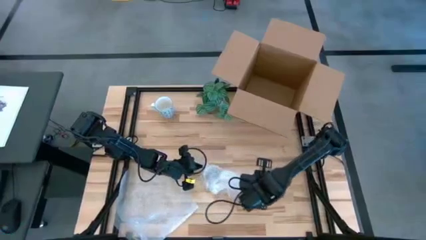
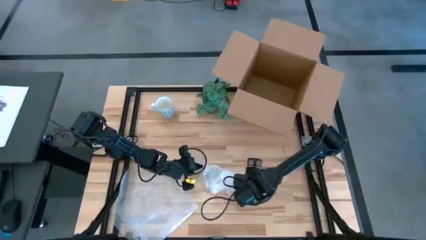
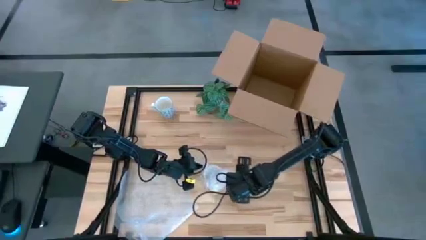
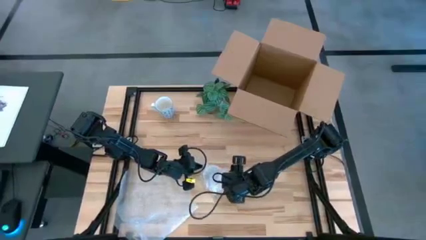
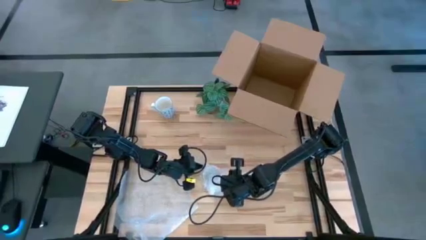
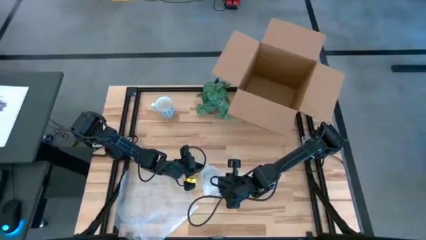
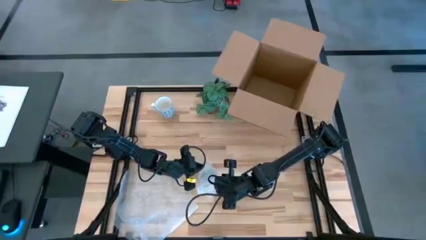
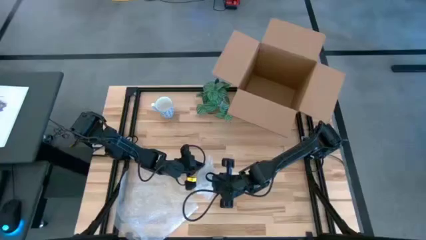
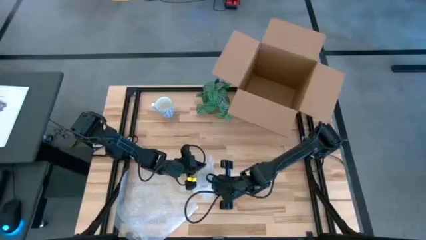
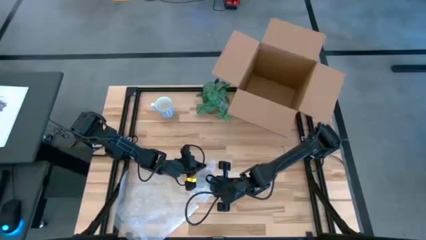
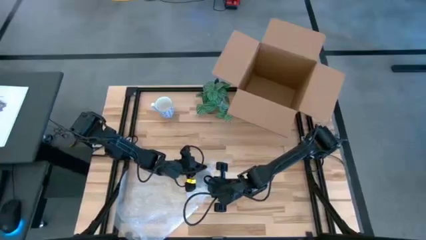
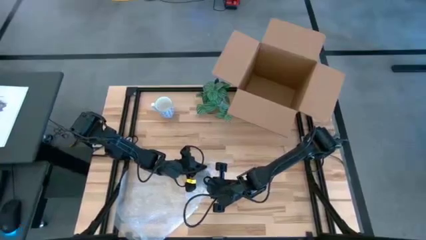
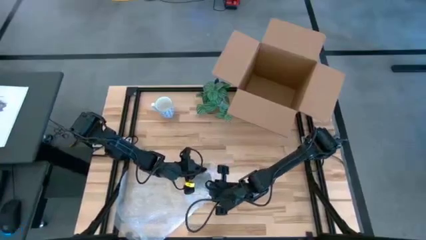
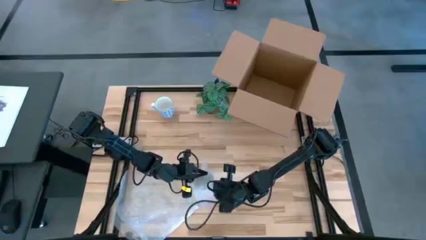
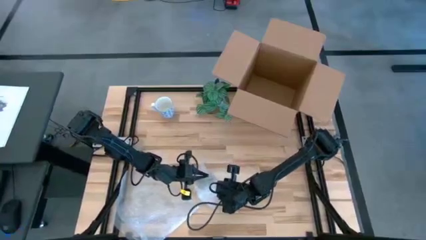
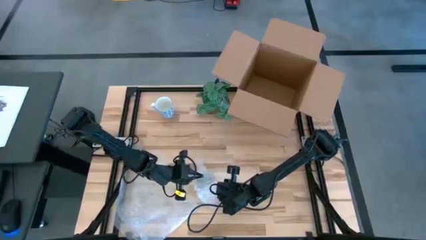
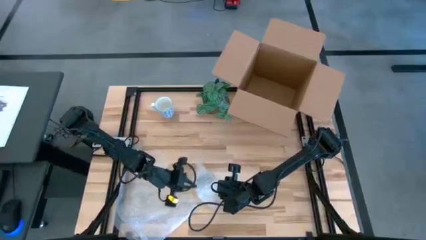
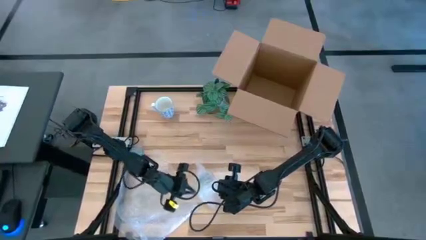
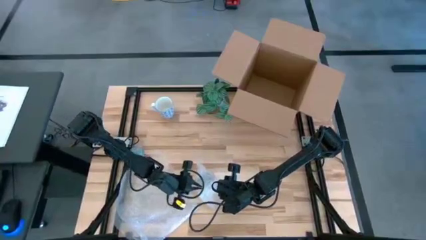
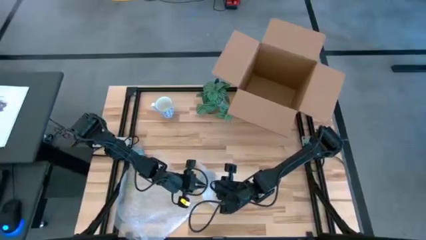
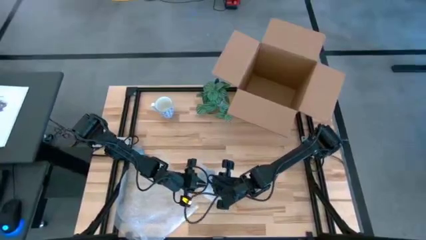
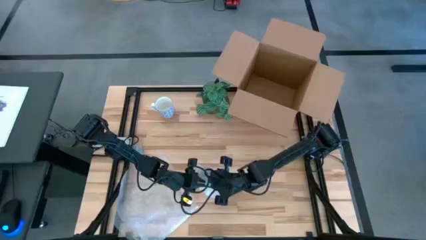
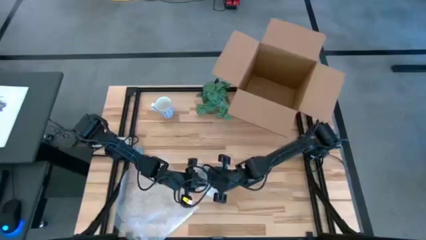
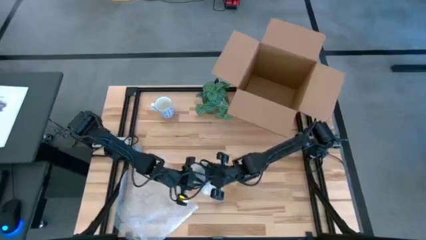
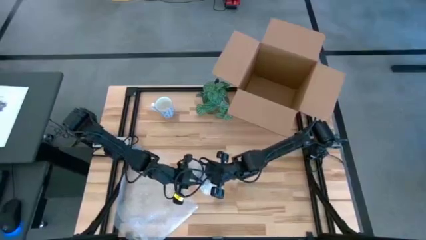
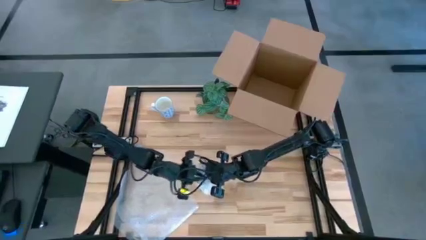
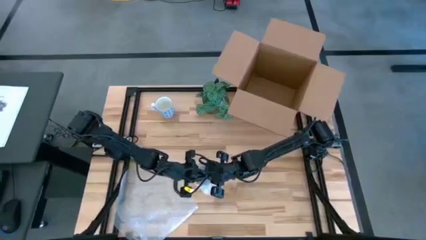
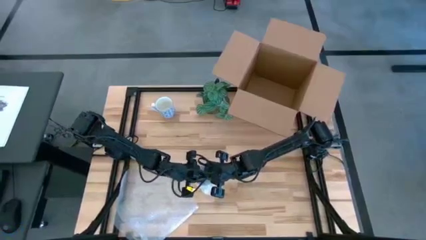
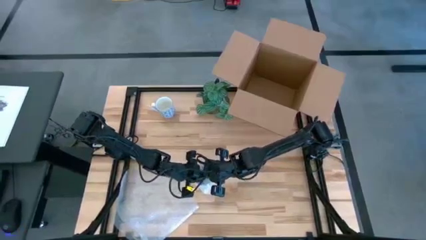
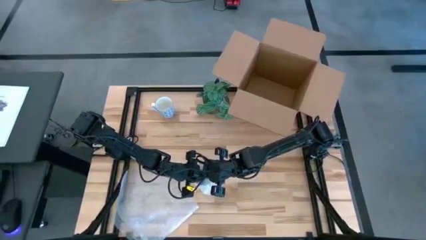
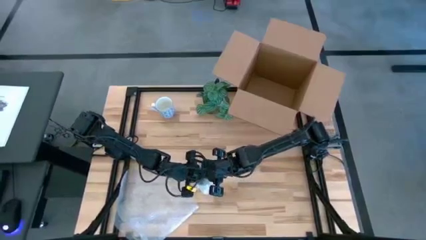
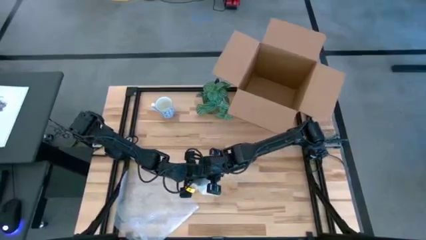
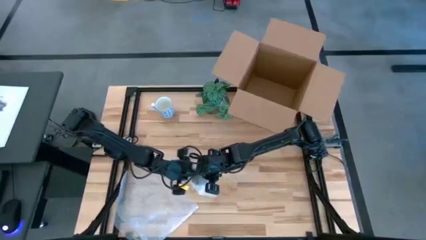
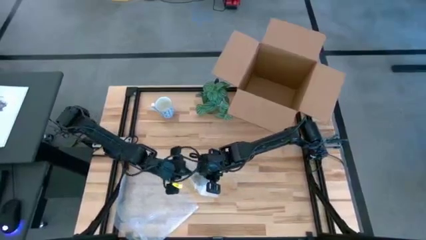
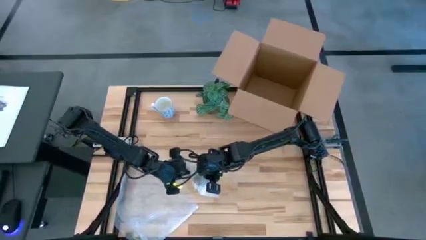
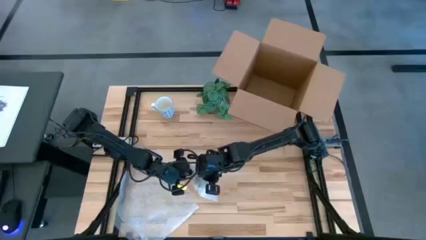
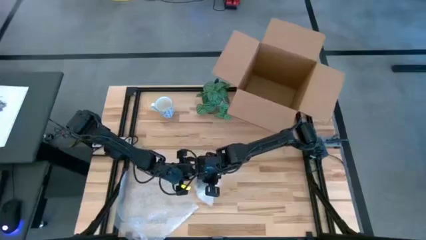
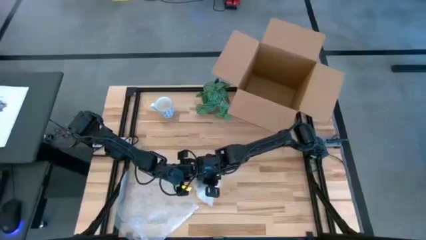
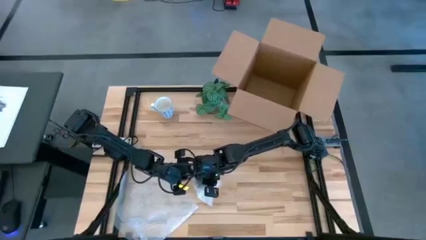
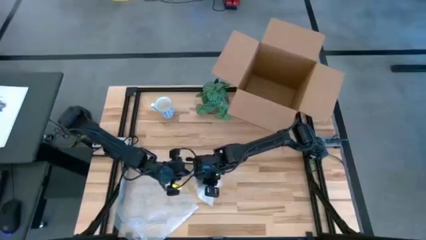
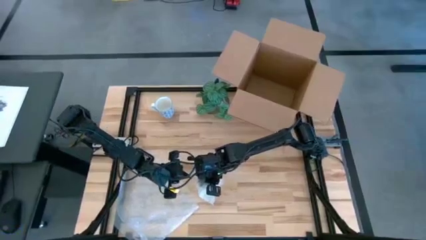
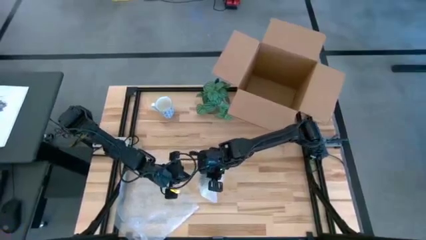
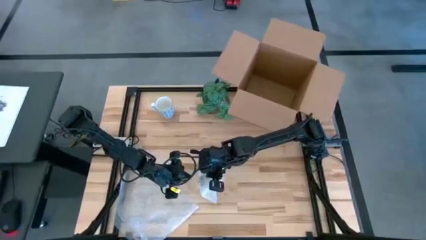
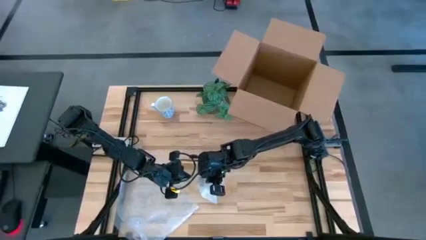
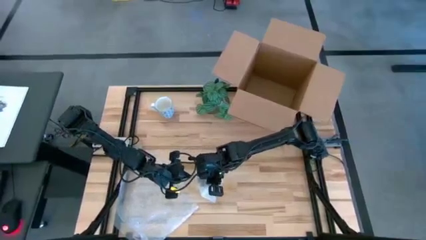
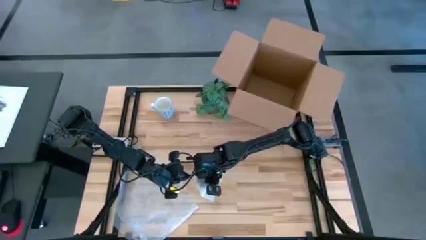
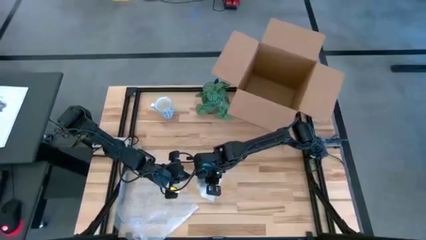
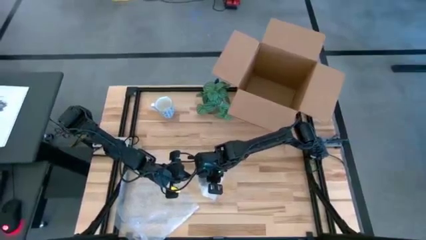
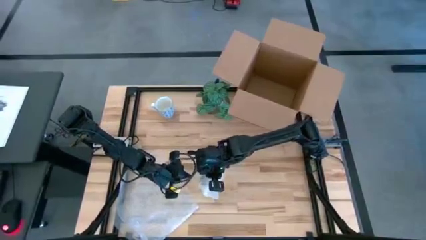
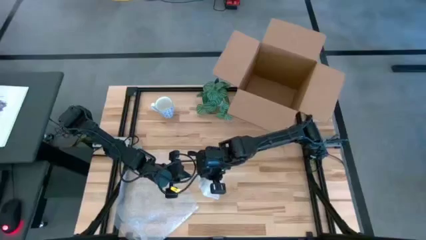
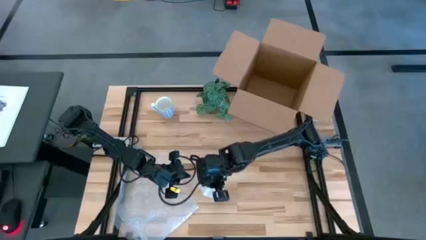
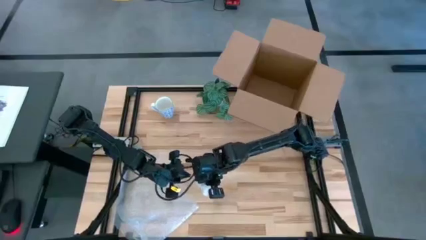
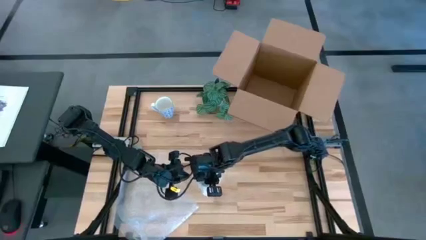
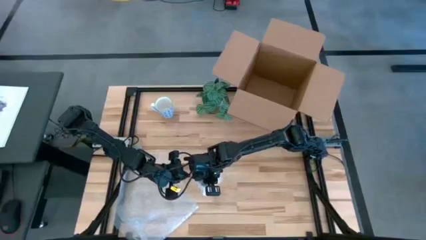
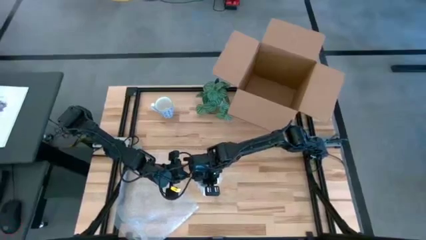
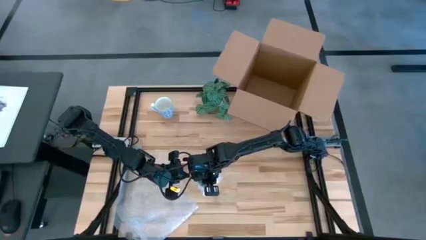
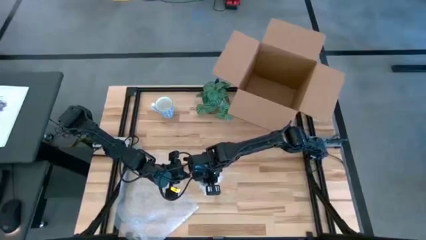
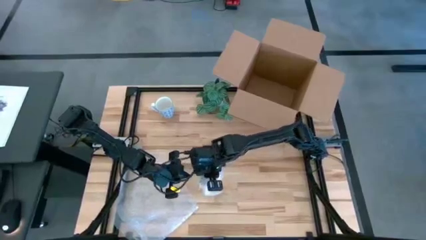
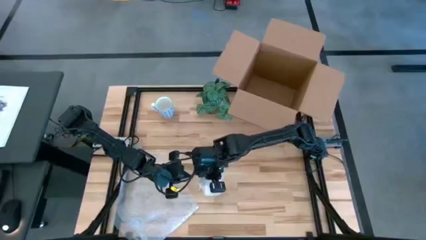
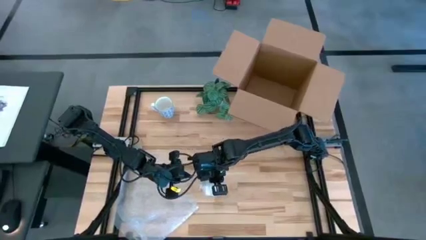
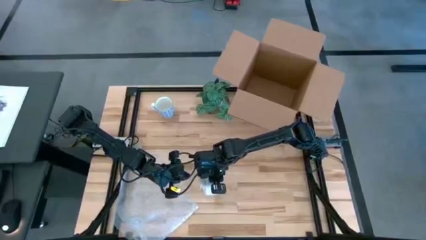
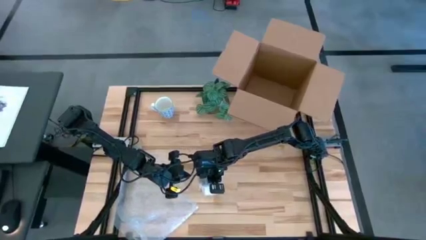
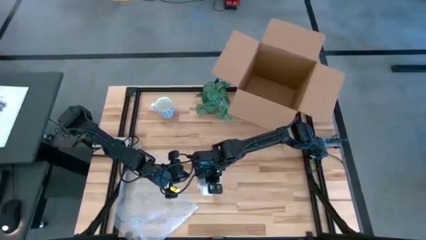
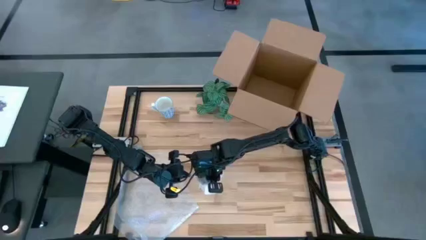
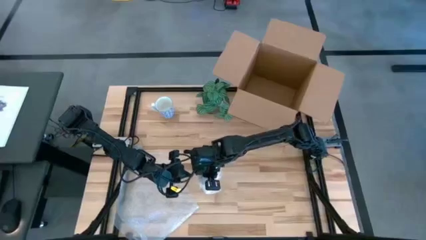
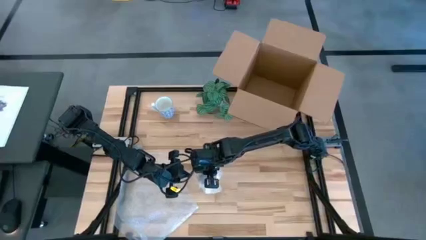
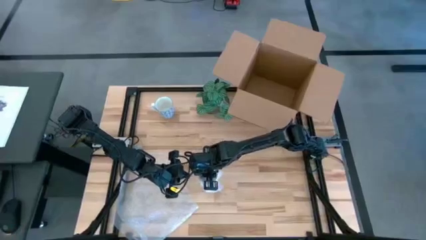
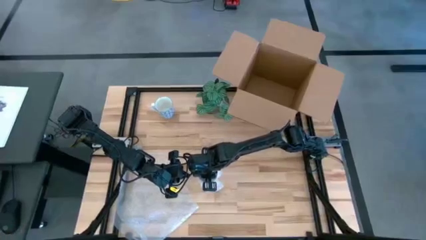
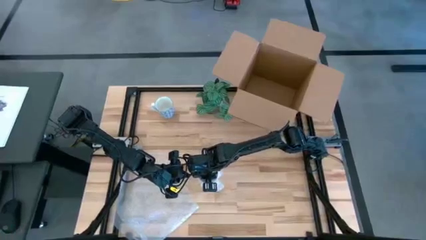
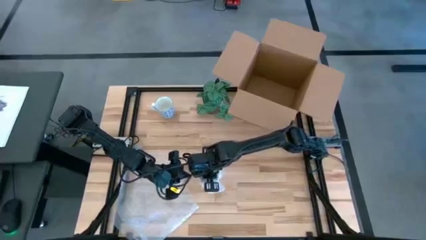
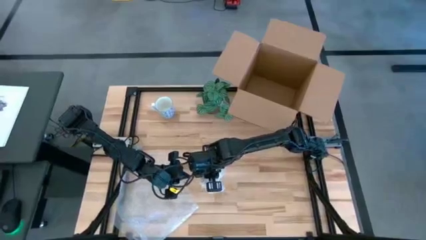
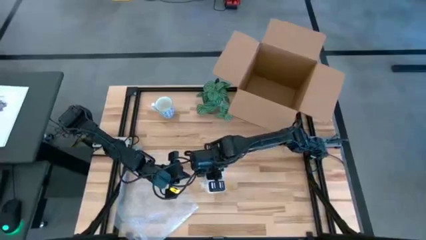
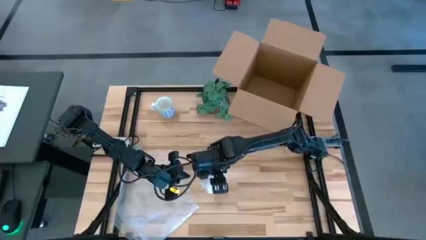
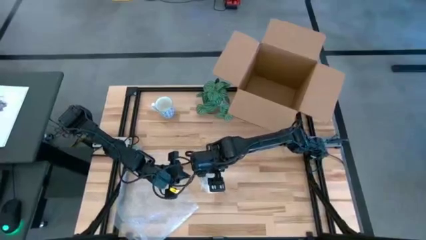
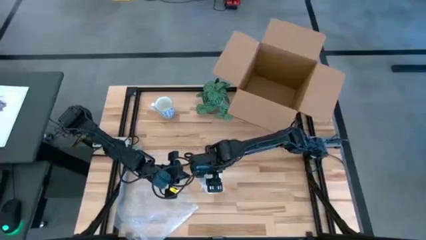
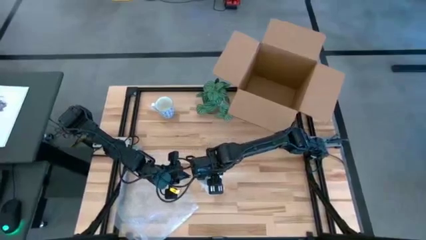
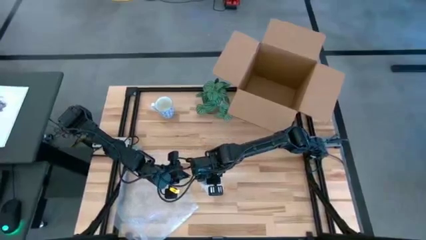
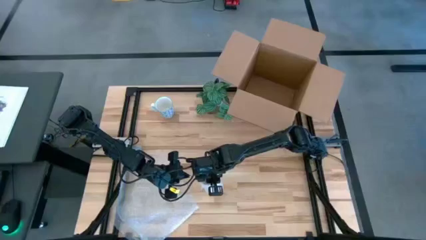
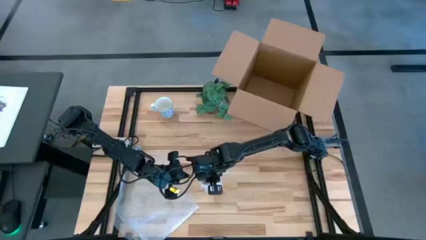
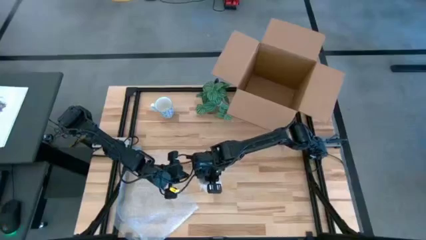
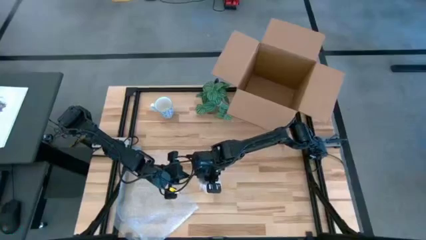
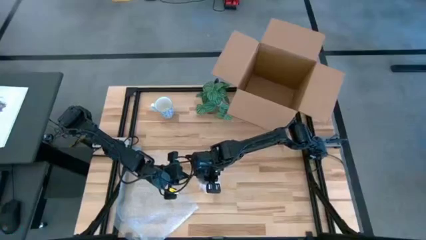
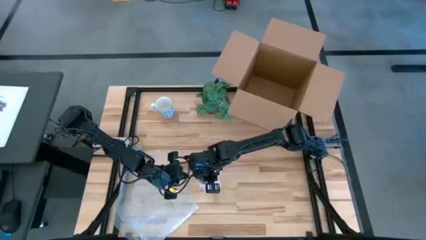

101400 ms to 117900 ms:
Task: wrap mug
Wrap the yellow mug
